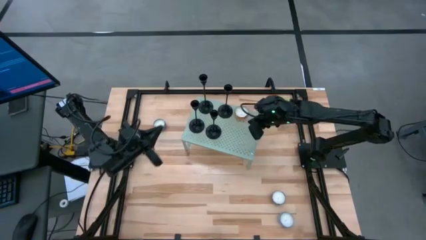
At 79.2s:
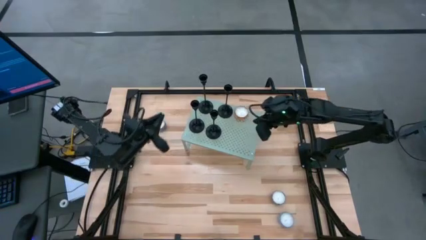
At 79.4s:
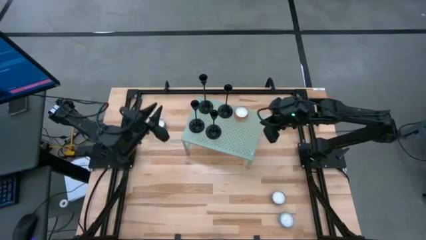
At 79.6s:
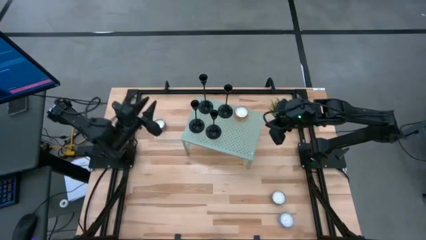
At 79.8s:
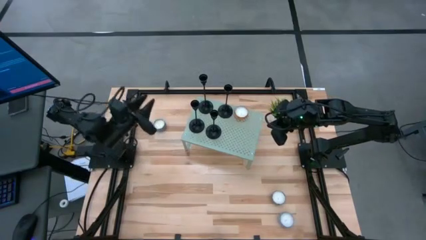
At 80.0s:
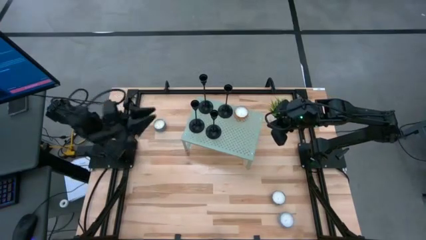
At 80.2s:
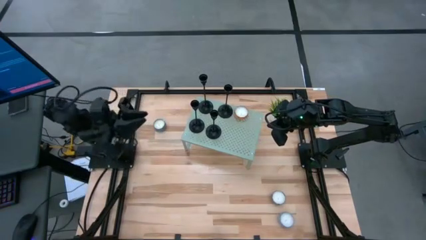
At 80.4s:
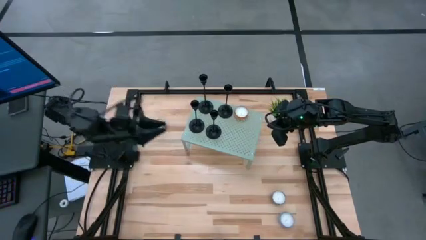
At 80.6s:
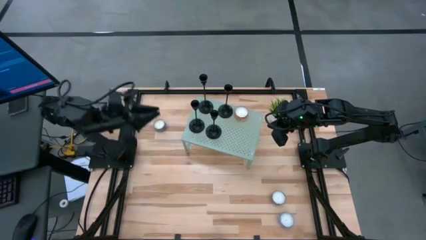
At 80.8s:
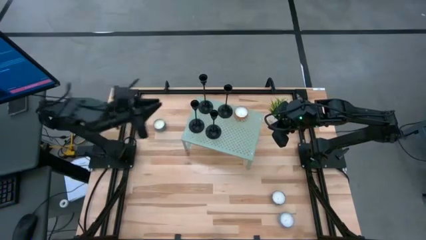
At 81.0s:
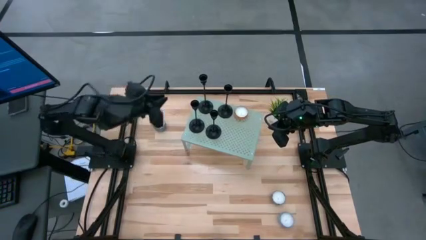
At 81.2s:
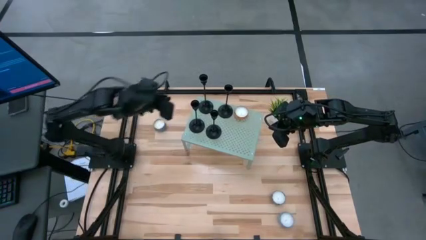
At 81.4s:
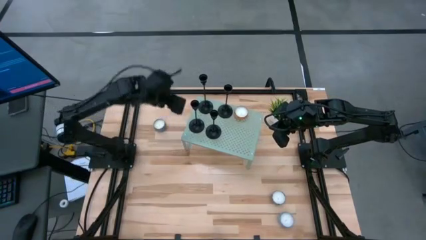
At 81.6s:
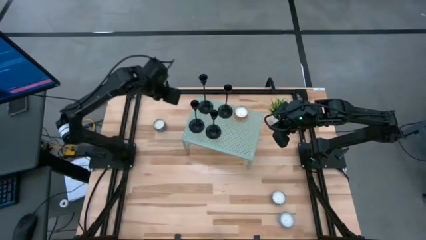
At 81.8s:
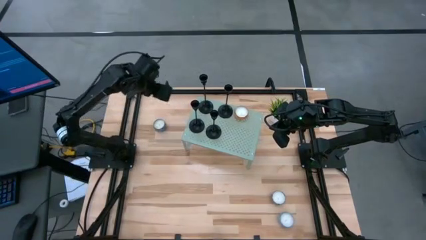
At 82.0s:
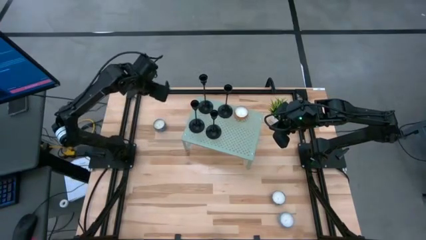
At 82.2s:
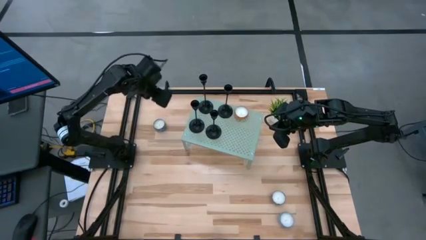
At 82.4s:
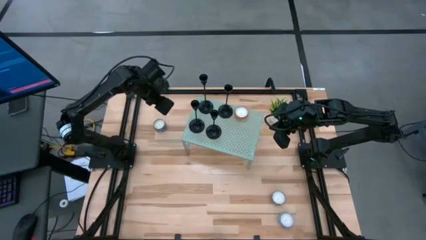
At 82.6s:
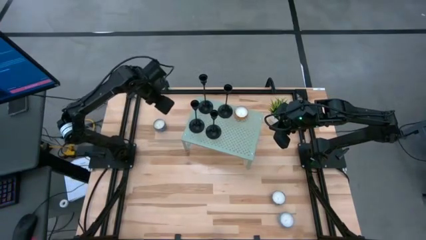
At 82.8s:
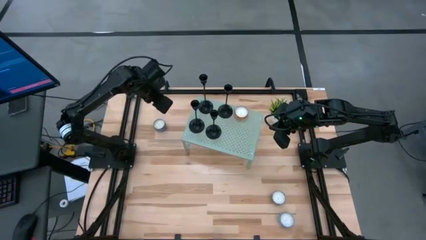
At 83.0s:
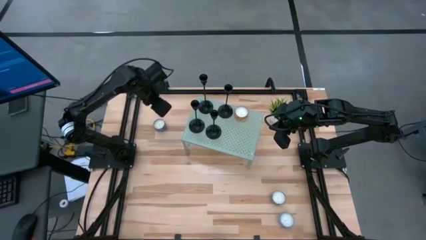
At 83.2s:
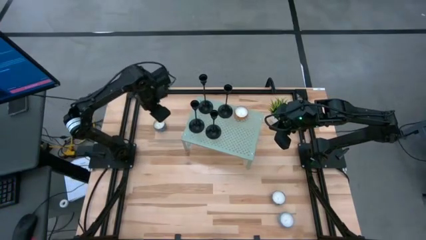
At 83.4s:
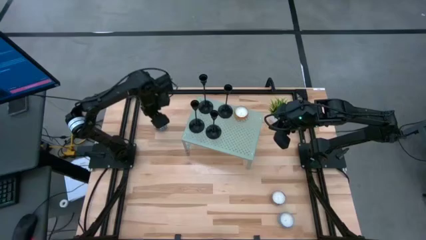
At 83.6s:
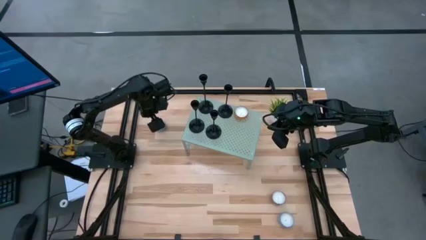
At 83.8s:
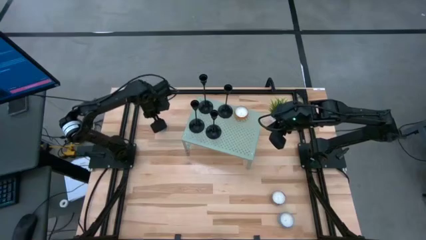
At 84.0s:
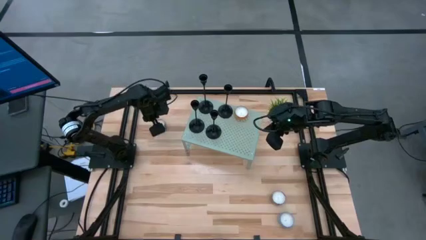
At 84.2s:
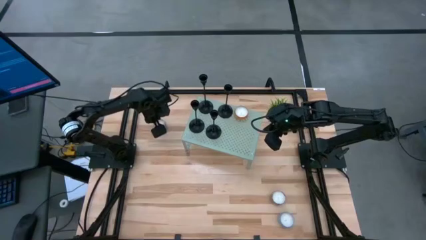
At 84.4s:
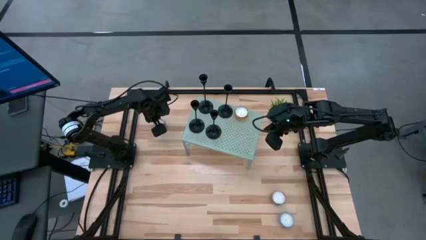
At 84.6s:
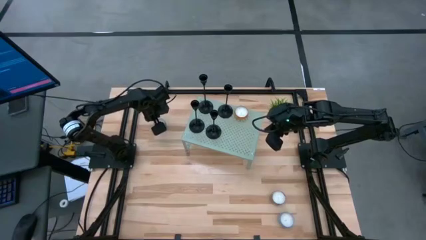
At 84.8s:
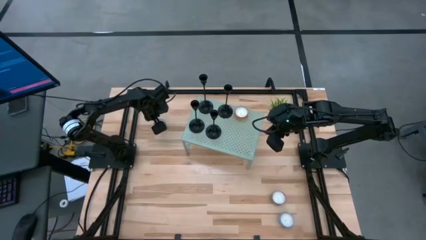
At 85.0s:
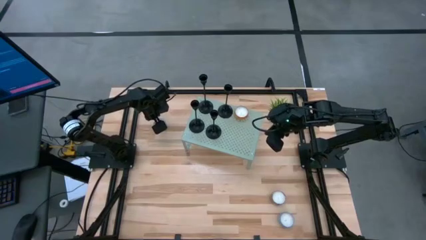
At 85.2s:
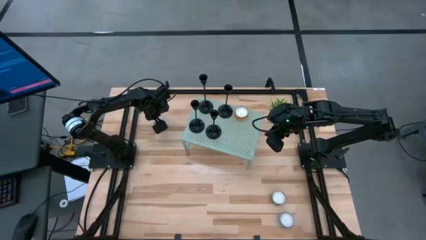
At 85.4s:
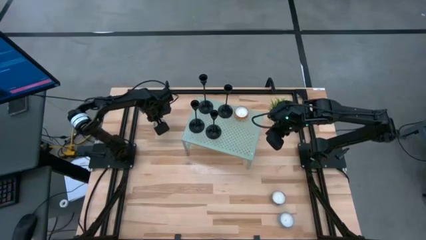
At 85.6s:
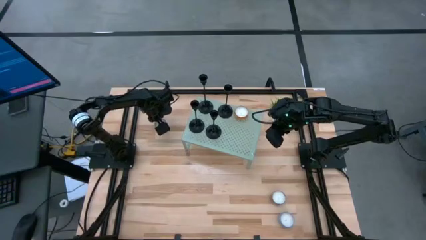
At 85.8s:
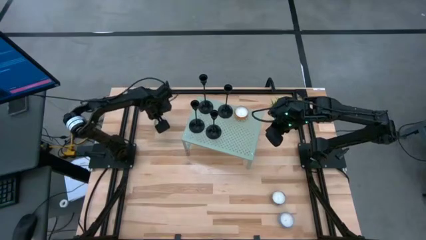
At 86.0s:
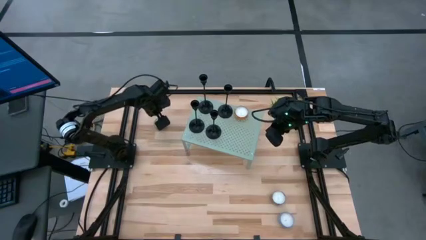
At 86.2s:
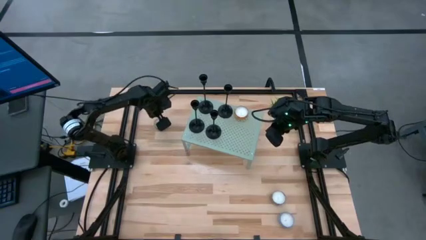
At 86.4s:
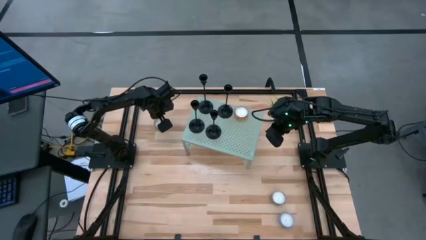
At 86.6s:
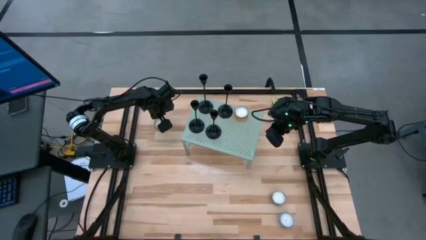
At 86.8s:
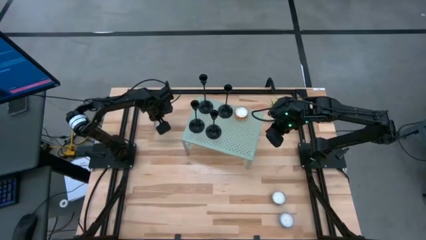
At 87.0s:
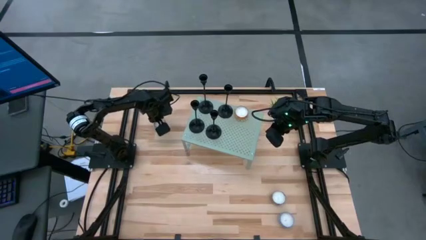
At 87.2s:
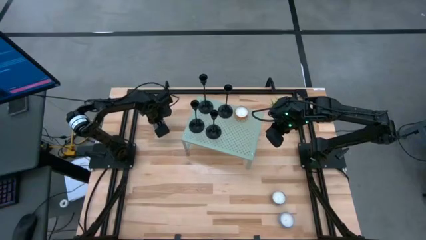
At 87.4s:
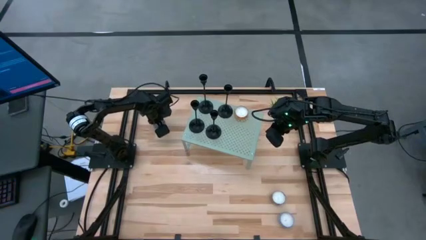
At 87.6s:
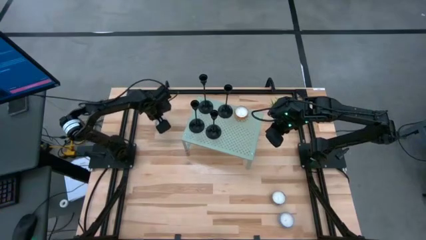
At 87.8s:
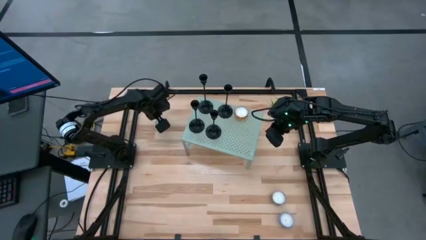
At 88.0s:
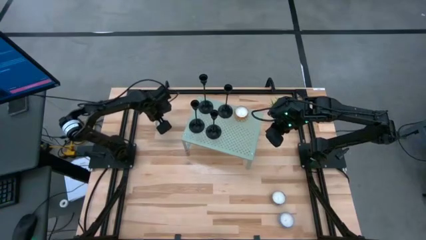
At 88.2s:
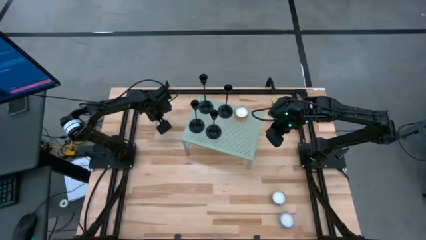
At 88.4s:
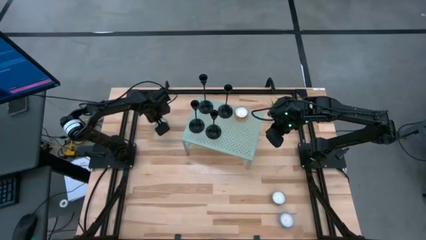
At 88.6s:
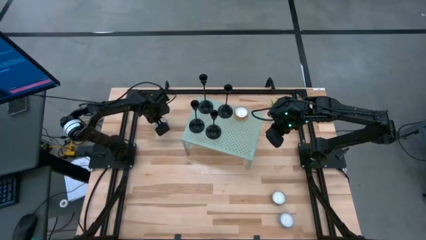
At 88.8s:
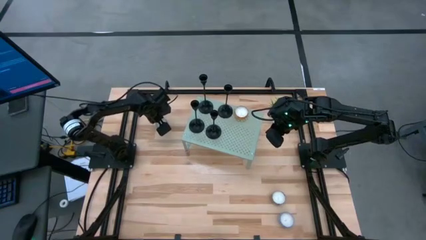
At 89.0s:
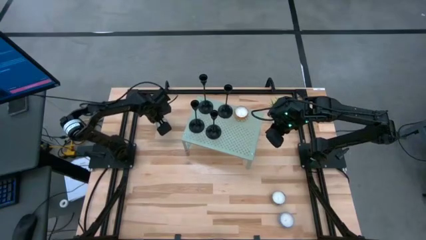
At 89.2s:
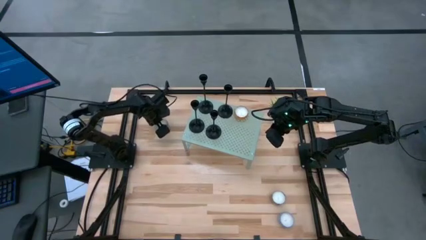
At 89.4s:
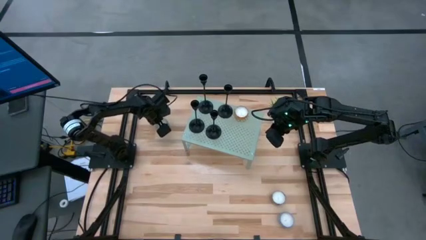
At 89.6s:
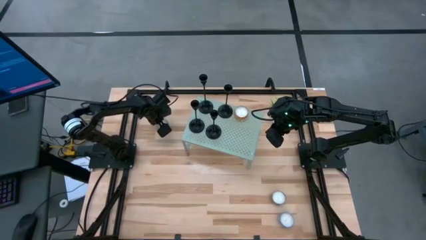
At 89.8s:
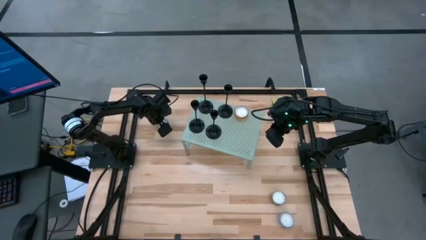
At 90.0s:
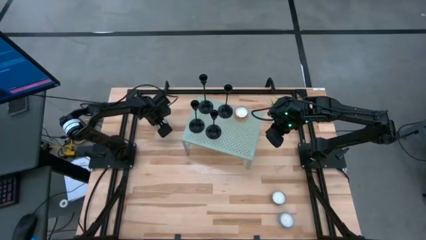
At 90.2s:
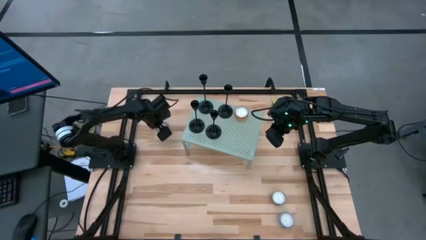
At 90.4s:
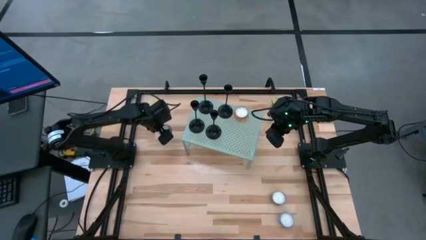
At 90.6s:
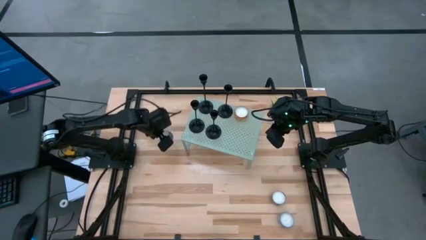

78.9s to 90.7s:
Task: Pick & Place candle stick holders
Put the blue scented candle on the shelf

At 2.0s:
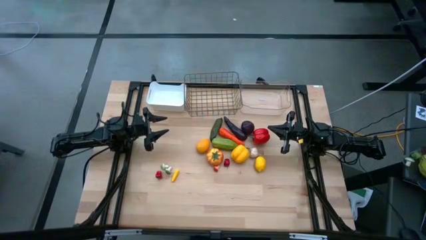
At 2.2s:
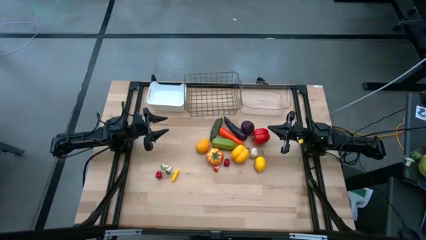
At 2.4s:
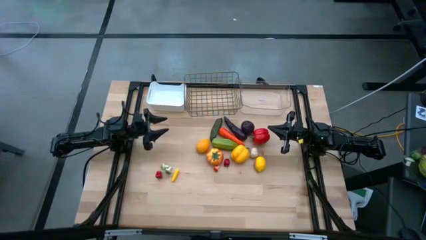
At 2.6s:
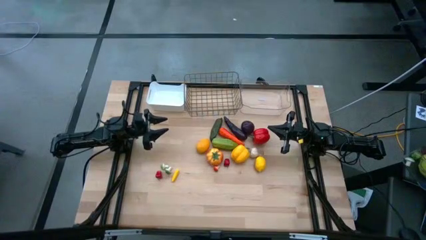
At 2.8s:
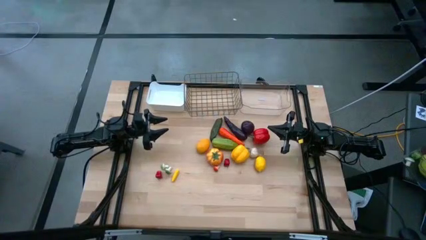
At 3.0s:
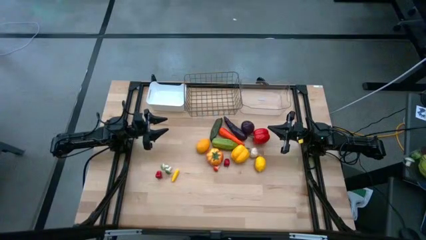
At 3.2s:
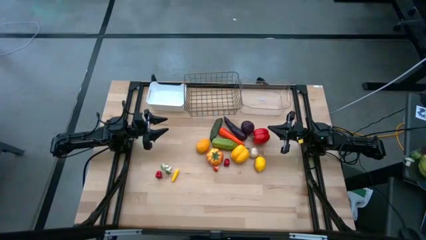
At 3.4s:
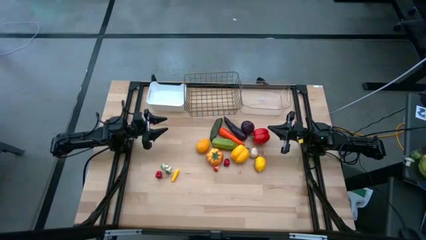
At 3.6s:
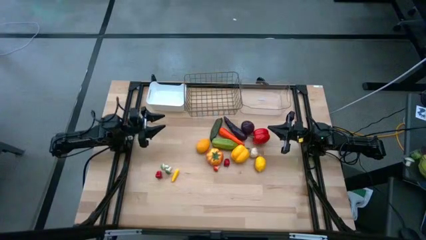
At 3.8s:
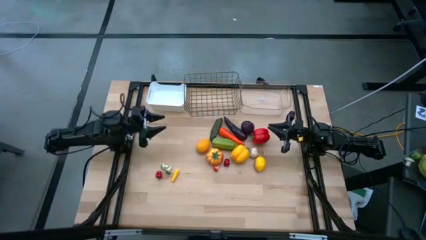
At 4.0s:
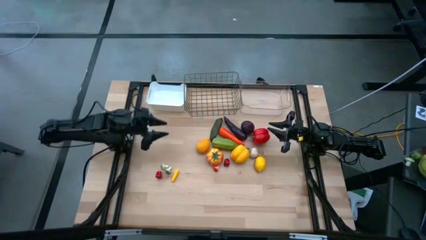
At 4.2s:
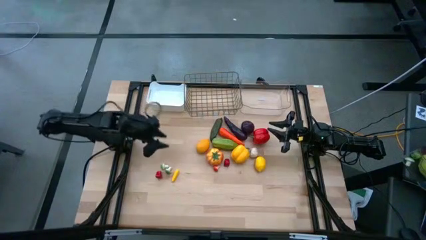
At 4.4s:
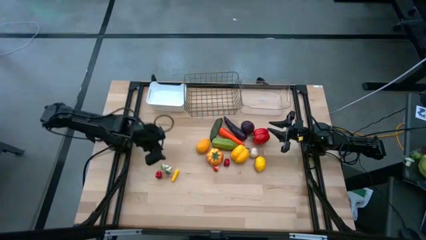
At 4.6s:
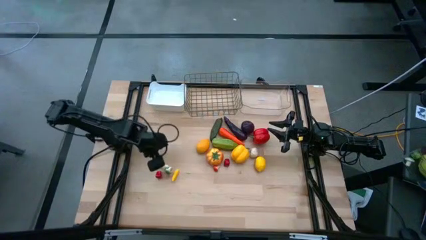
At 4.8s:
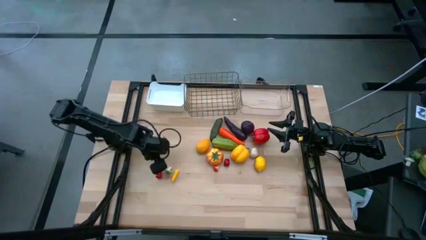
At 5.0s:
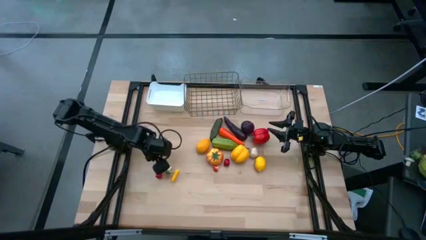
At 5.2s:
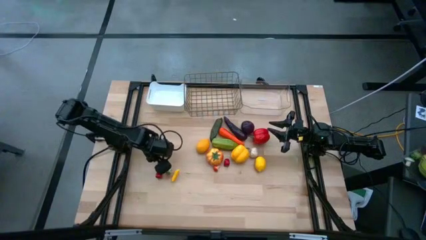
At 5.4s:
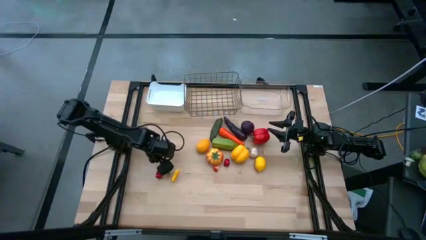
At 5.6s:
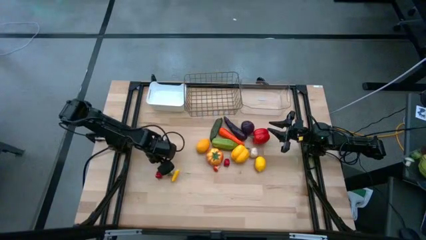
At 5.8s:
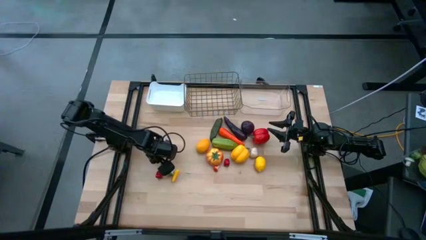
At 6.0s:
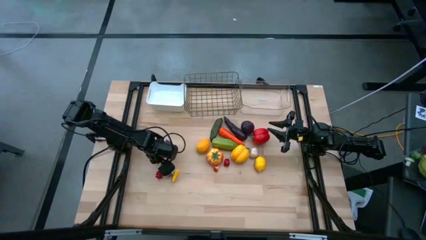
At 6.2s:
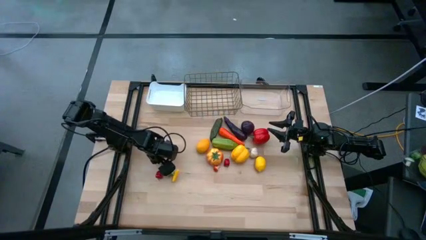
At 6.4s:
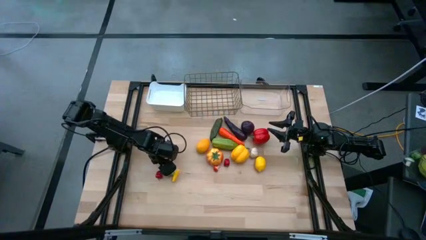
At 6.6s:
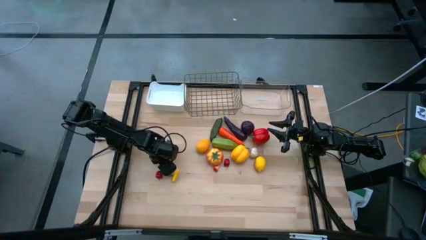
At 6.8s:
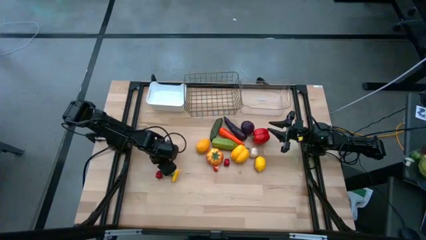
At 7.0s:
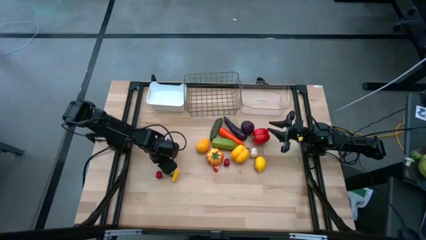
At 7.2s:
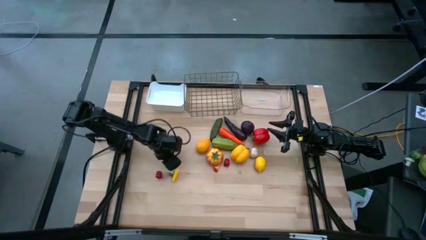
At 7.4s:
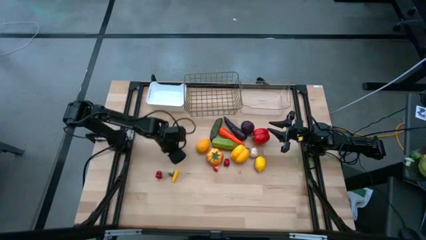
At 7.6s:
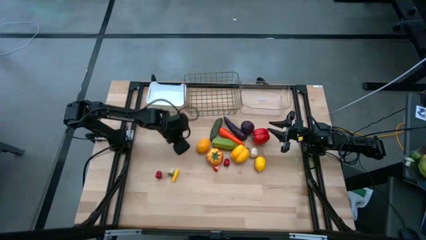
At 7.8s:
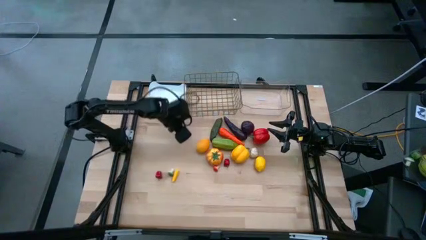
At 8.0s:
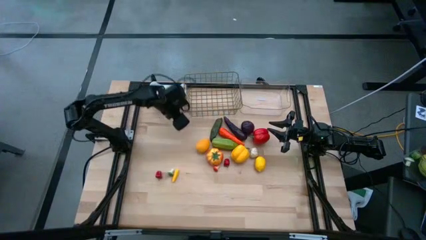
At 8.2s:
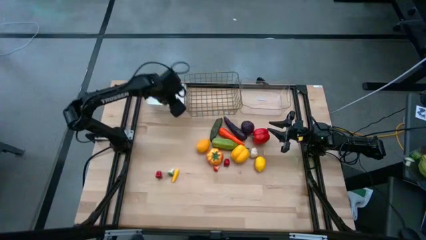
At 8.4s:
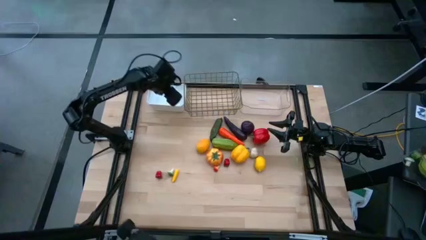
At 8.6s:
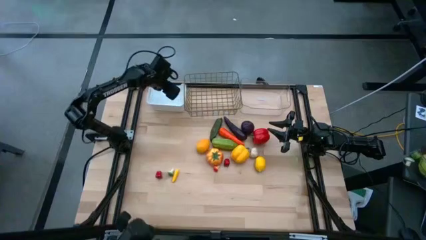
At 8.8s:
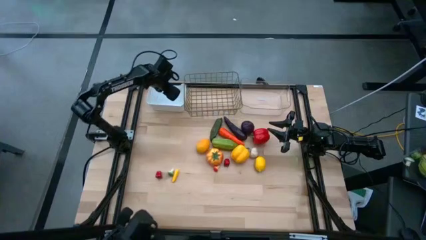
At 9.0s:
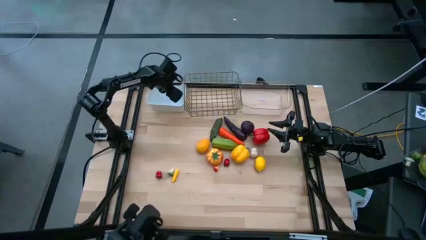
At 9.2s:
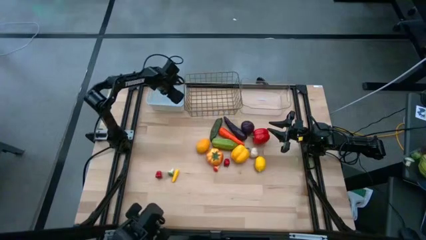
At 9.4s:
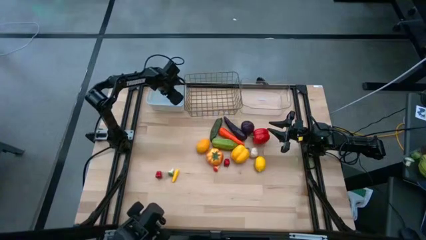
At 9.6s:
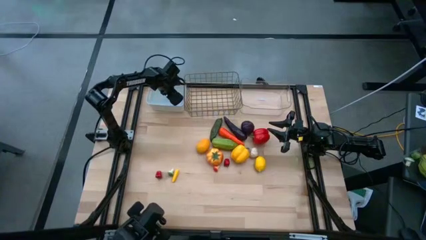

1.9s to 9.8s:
Task: Sort produce into baskets
Put the left green mushroom into the white bin
